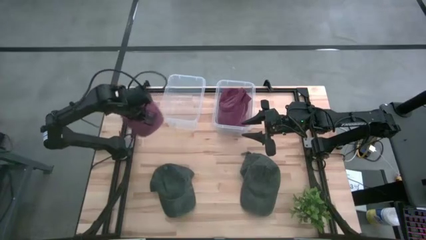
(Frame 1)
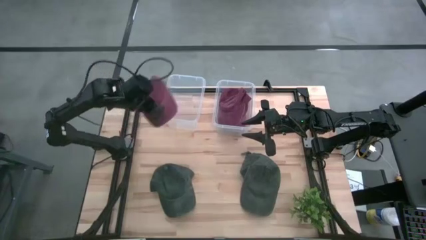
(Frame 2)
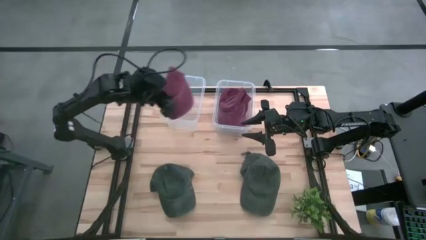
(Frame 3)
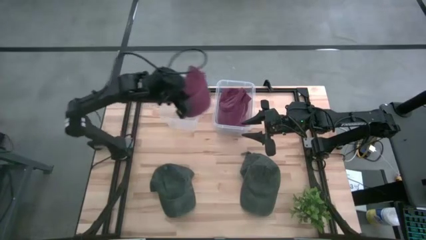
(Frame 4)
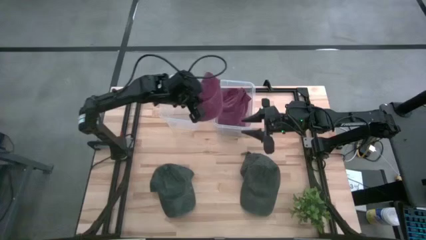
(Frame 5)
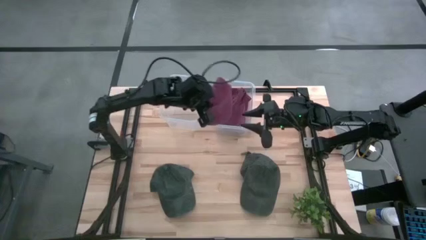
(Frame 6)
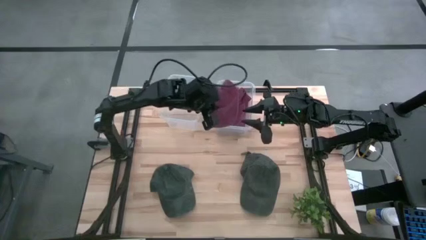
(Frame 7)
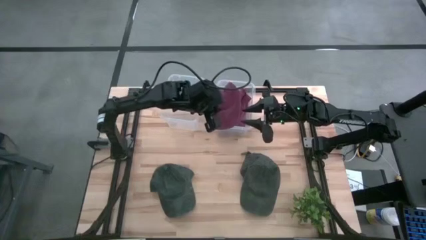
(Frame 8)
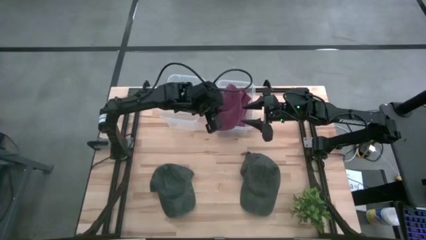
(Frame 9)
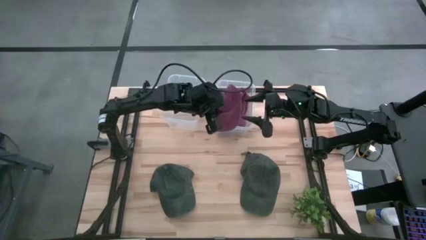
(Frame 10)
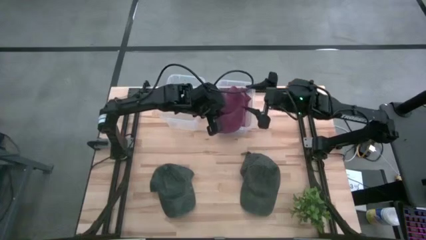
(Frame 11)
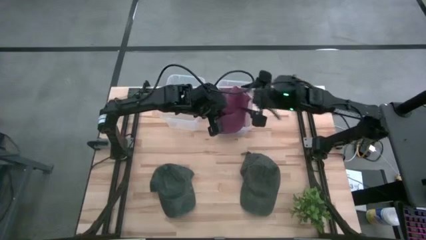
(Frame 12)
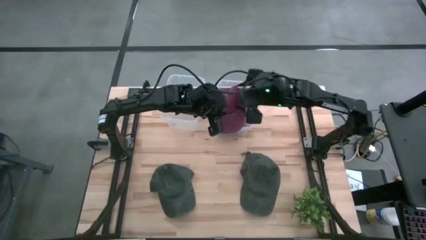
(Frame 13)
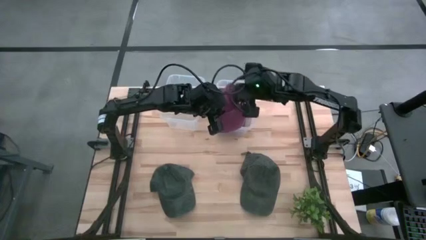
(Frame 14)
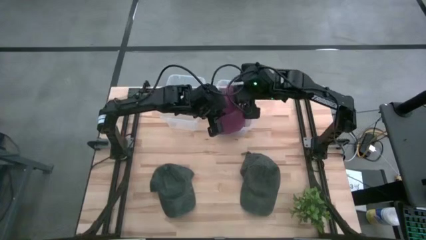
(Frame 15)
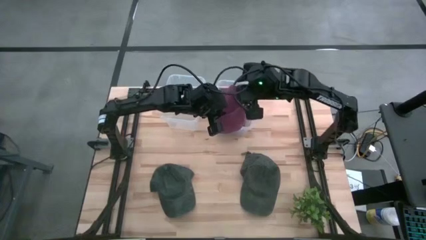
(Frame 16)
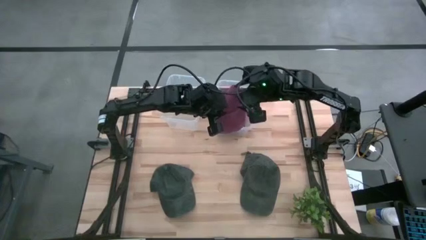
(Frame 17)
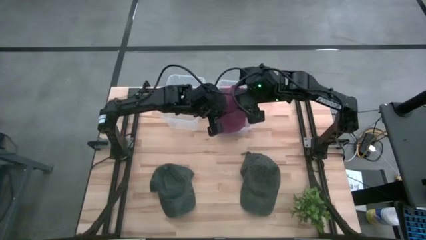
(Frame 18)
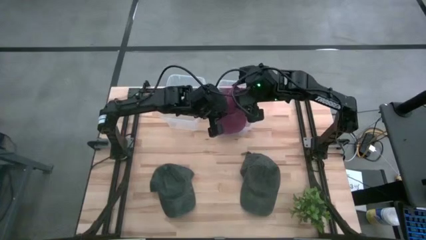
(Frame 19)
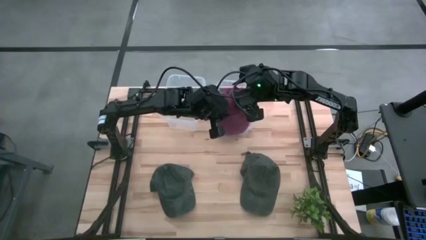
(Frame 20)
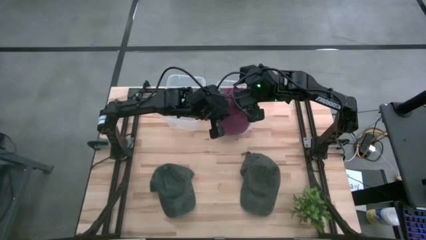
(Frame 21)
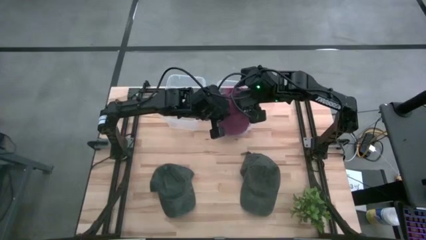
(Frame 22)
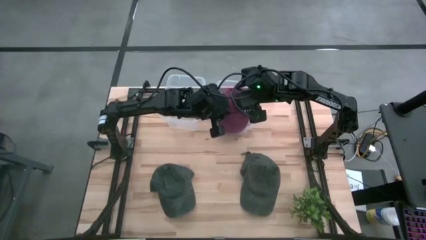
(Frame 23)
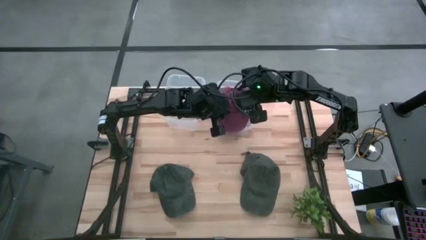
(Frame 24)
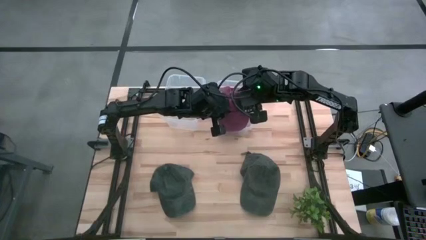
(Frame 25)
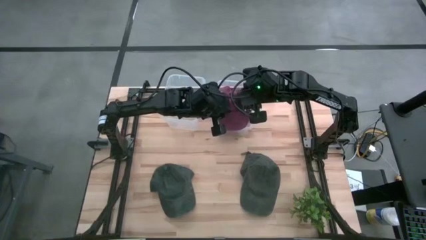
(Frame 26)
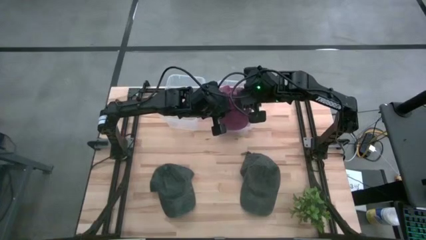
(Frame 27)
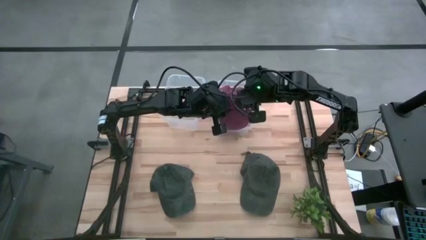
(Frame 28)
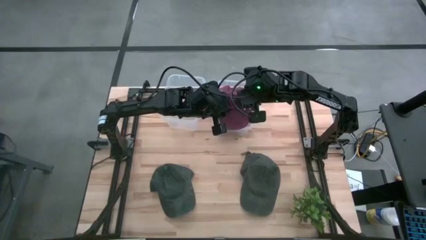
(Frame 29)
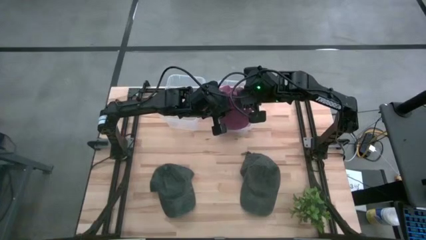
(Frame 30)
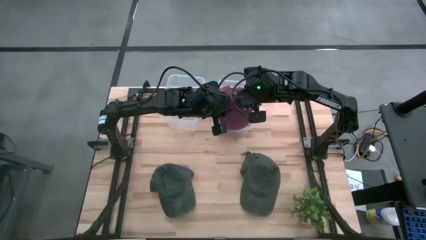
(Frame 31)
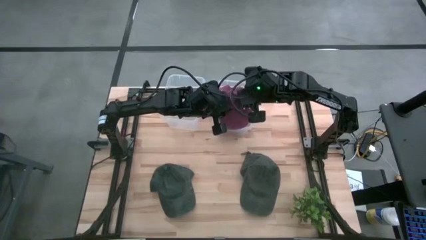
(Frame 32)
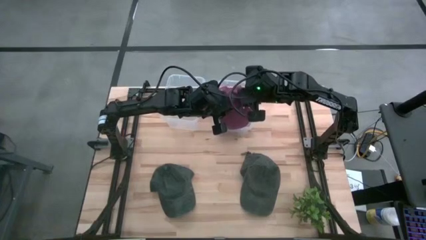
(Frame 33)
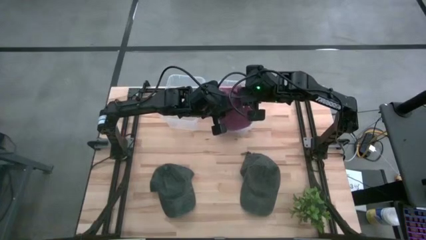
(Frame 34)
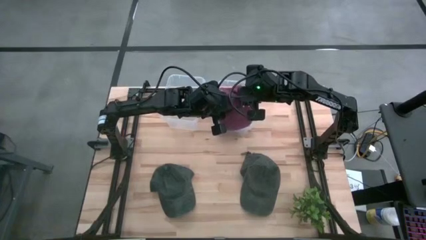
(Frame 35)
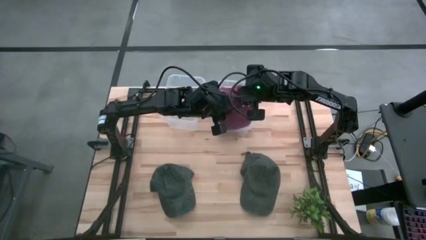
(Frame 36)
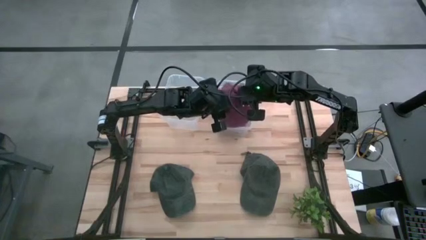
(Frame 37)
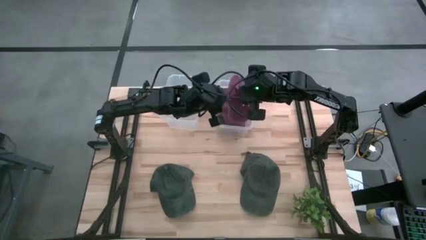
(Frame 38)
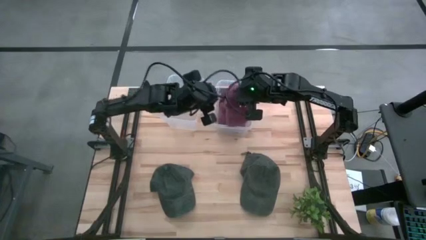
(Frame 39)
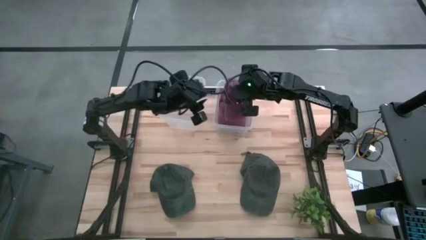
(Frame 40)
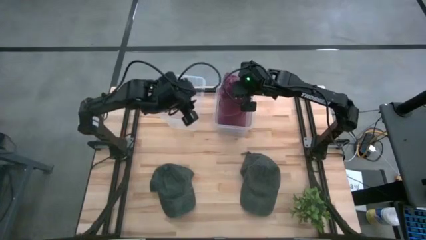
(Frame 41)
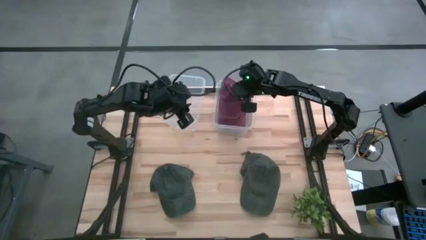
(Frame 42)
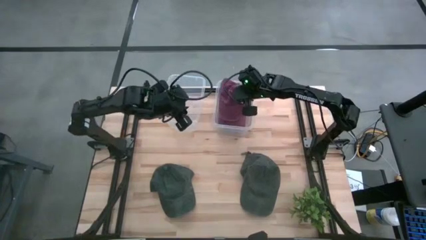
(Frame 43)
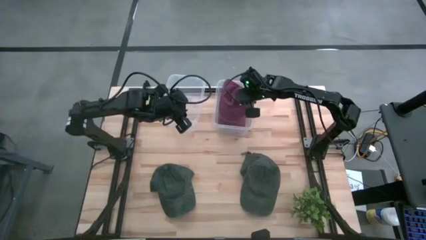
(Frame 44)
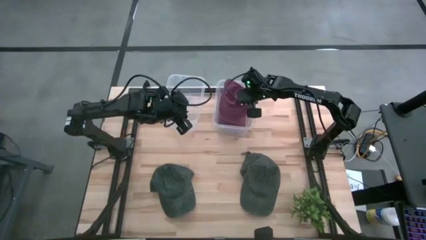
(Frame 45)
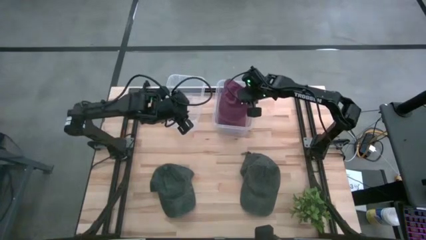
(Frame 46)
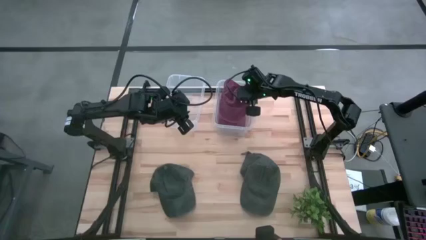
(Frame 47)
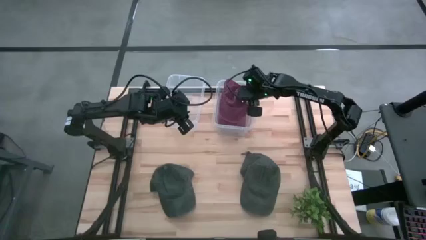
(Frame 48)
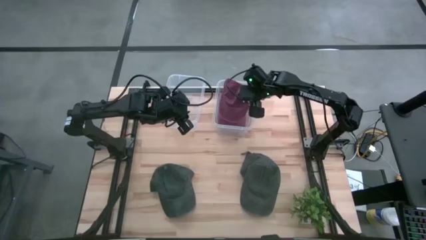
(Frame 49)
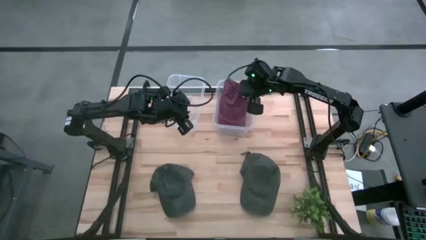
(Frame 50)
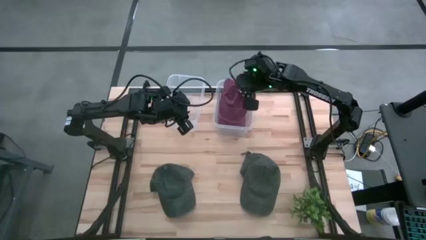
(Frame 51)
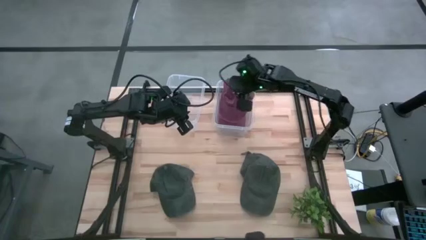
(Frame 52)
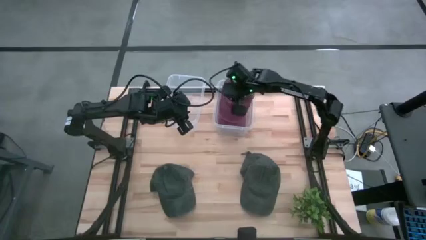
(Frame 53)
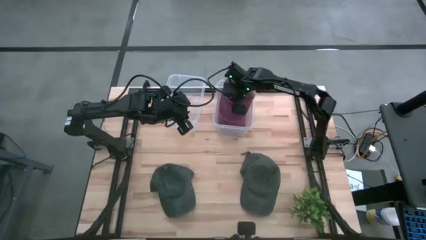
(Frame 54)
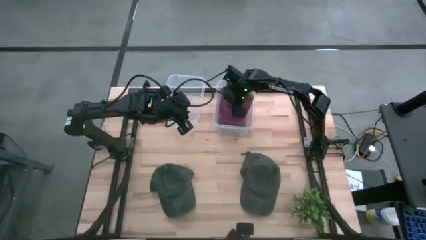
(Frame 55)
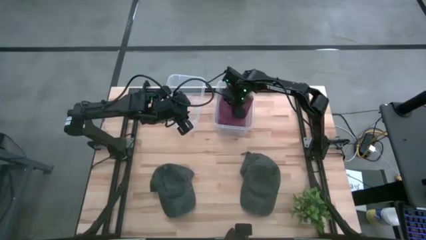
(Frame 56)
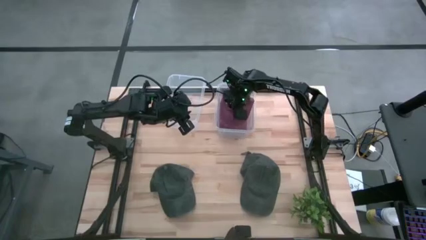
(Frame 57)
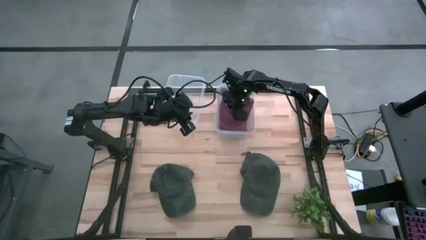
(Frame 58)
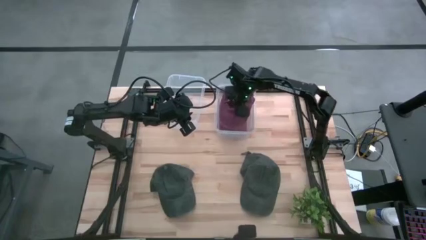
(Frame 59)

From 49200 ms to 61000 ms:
Task: Pick & Place hat
Put the red cap into the right transparent bin

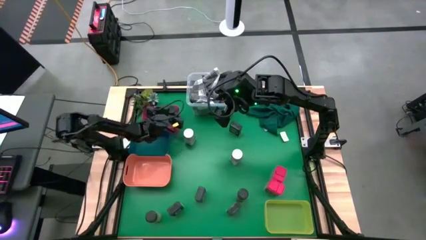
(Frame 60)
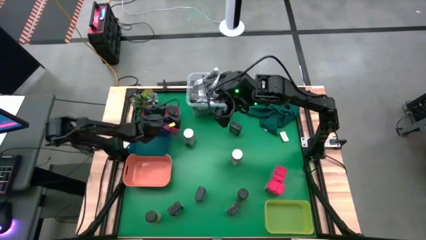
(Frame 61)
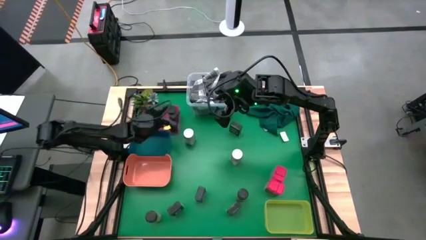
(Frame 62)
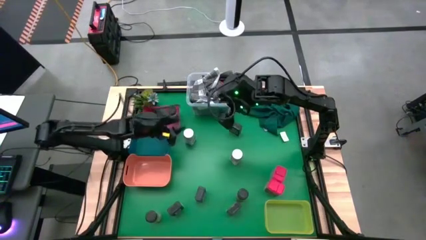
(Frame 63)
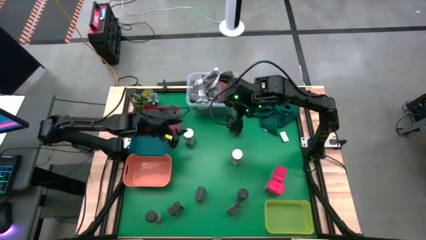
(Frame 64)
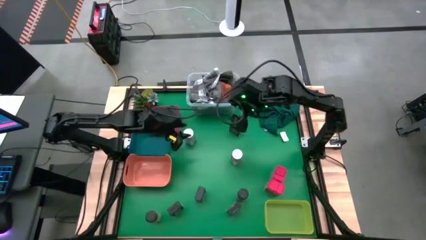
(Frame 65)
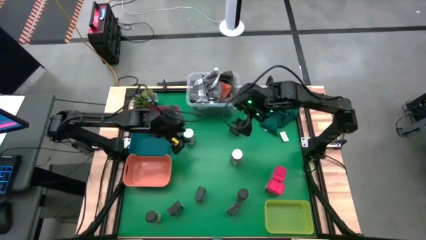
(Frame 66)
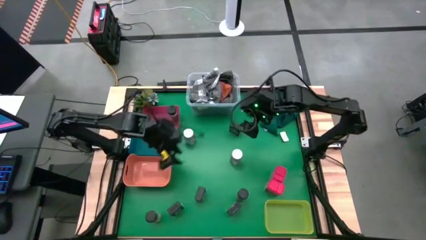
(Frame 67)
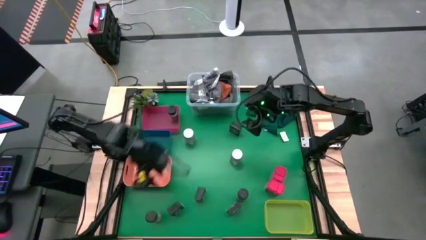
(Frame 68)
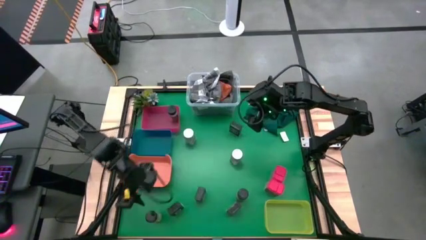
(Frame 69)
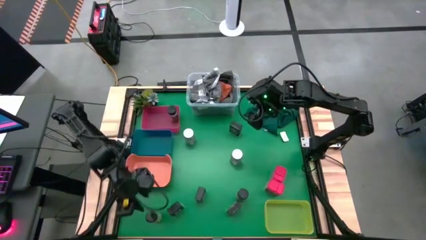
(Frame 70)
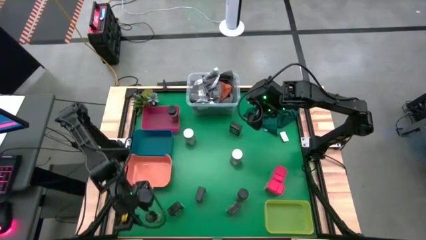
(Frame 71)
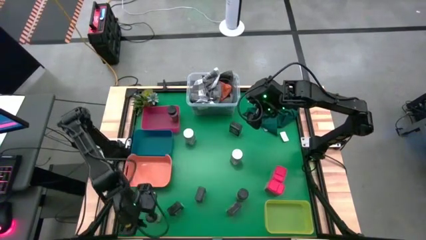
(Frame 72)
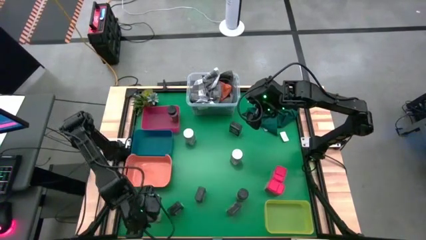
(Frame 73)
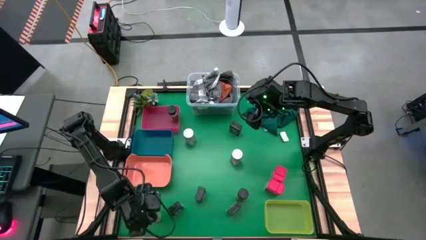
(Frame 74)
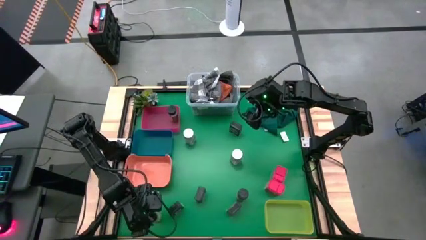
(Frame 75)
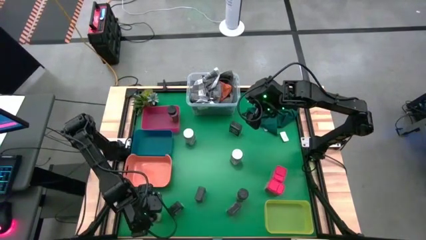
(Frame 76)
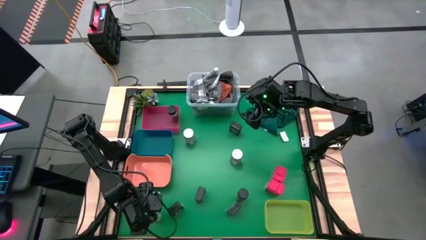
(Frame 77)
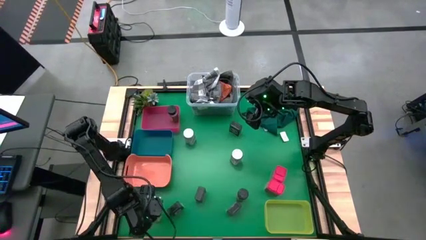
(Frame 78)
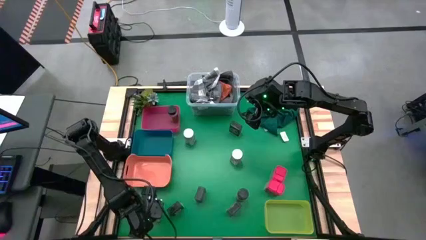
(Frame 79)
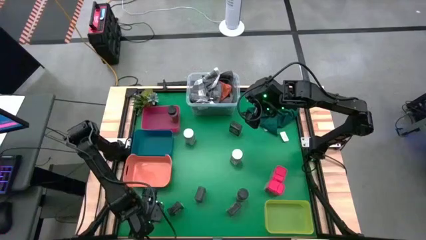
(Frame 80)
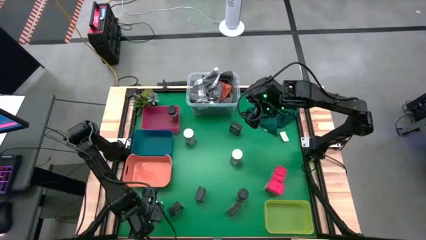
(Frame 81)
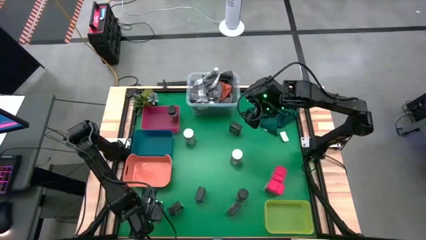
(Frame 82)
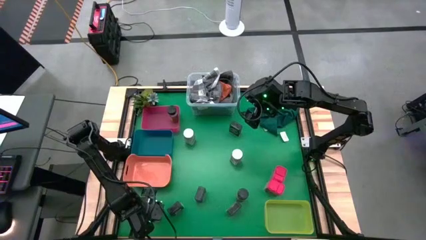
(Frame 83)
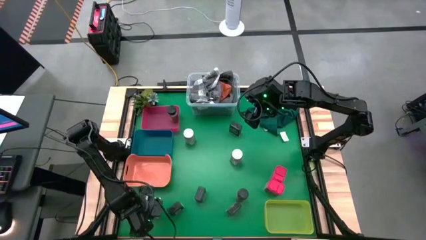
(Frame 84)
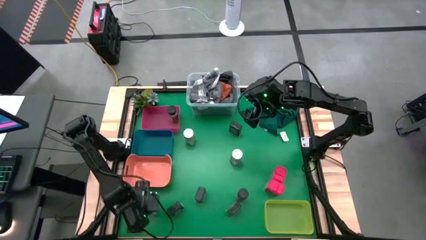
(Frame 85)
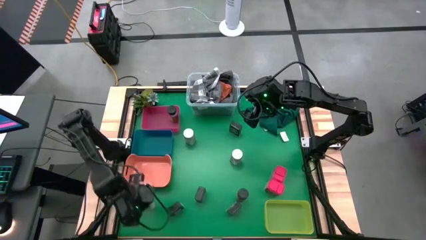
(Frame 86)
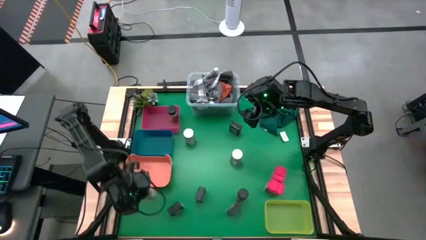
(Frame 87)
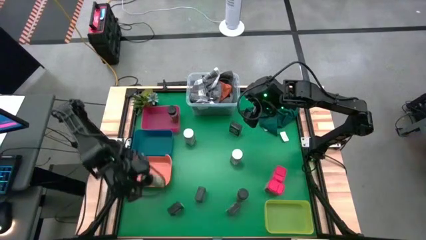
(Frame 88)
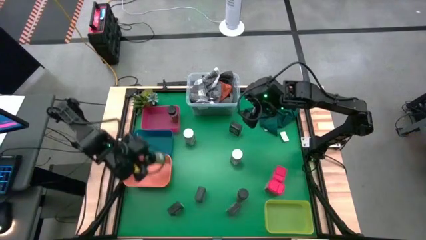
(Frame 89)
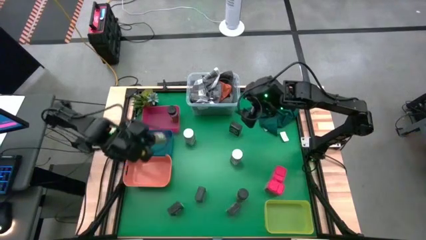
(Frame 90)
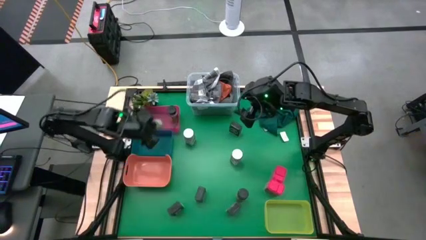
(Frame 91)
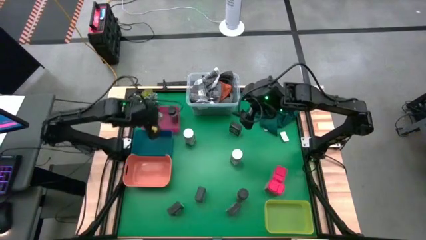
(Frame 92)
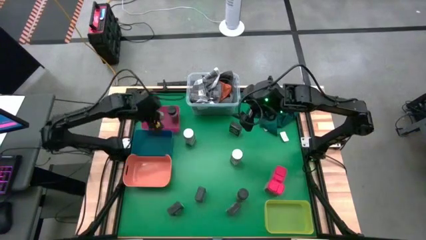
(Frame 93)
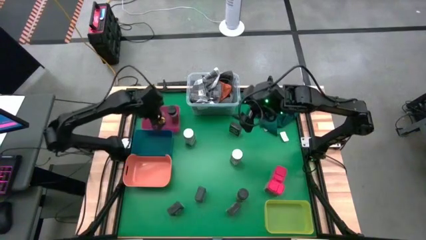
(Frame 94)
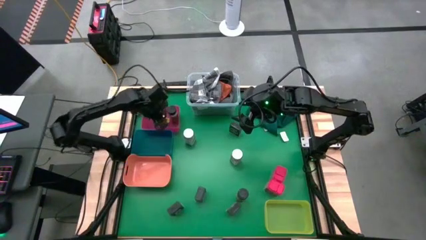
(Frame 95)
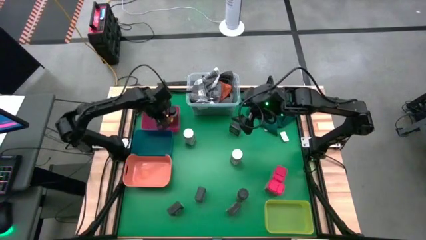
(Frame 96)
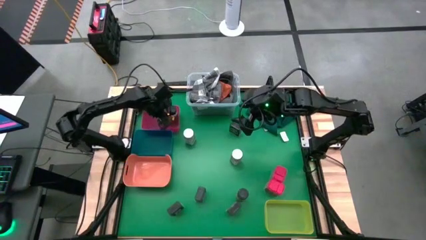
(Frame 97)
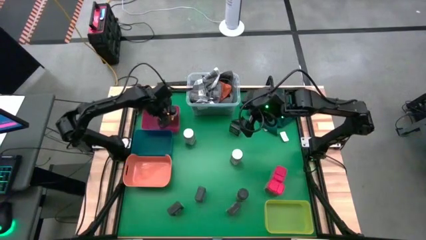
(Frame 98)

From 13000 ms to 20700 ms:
Task: Sort spices by type
Put the left black spice bottle into the red bin
